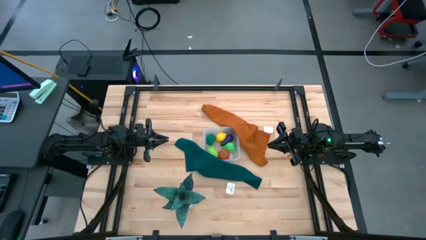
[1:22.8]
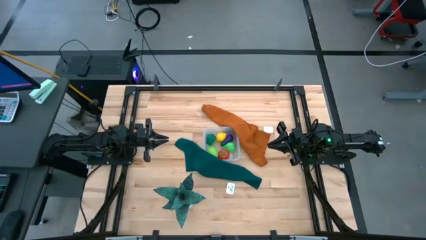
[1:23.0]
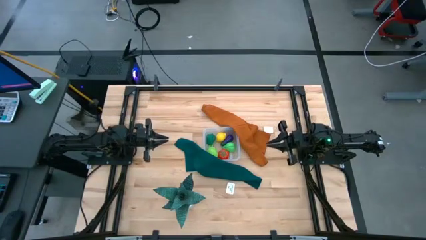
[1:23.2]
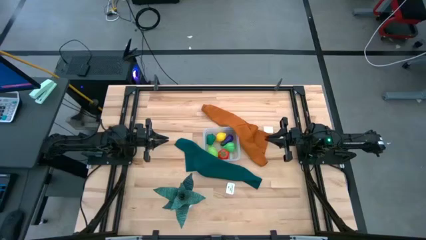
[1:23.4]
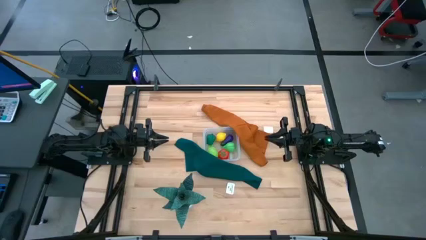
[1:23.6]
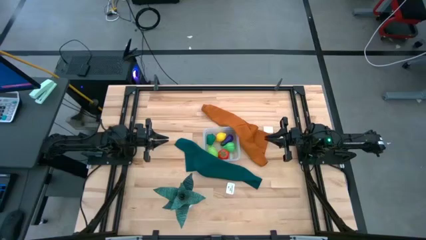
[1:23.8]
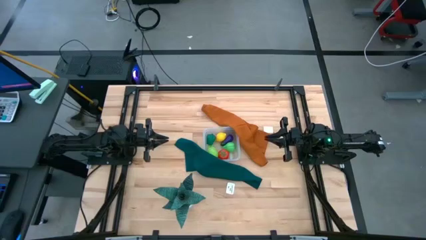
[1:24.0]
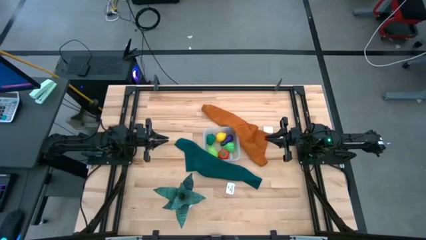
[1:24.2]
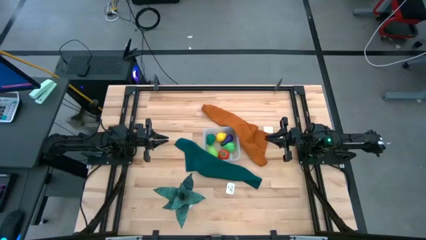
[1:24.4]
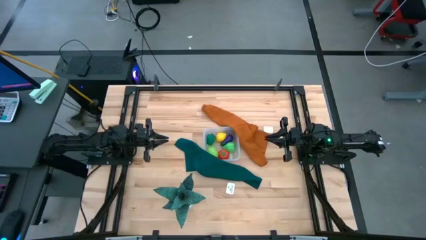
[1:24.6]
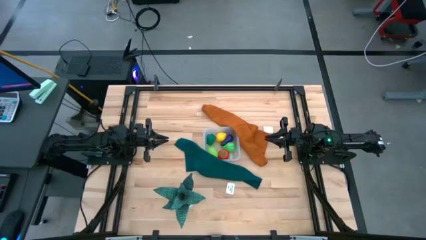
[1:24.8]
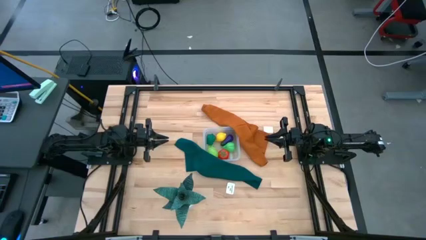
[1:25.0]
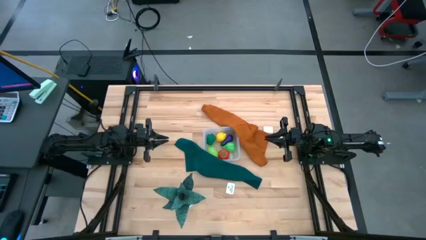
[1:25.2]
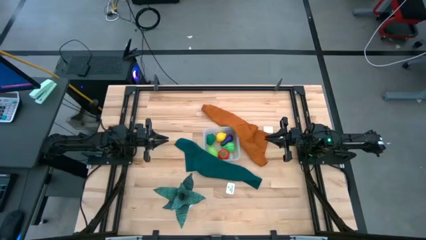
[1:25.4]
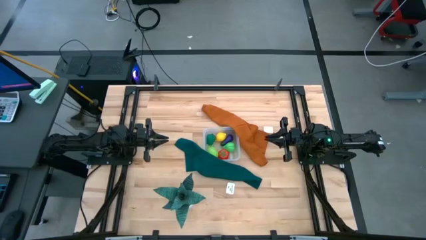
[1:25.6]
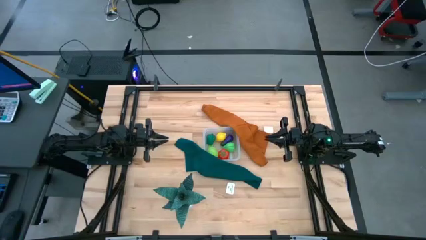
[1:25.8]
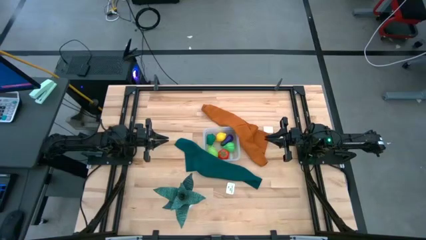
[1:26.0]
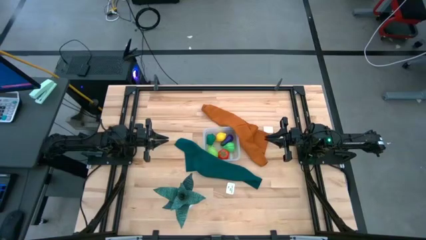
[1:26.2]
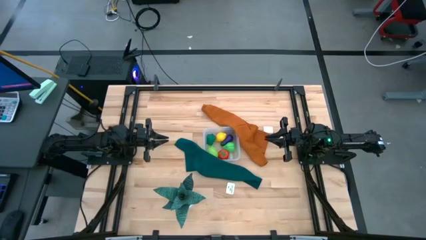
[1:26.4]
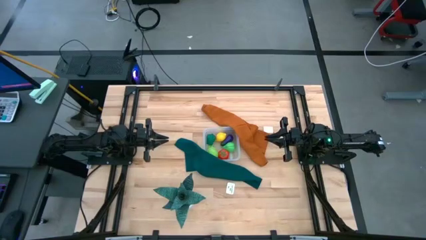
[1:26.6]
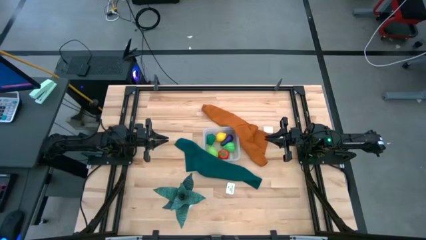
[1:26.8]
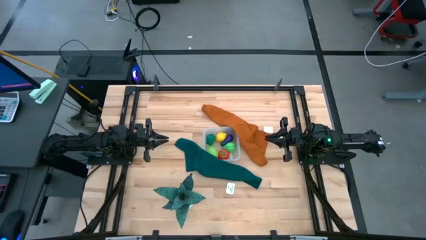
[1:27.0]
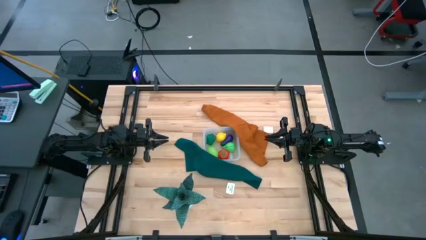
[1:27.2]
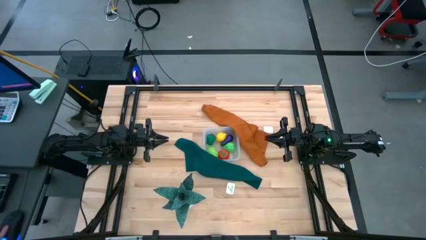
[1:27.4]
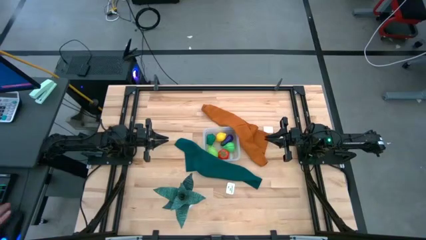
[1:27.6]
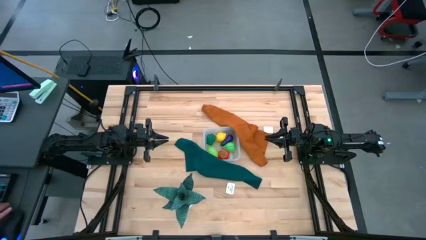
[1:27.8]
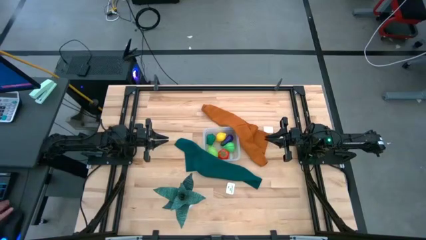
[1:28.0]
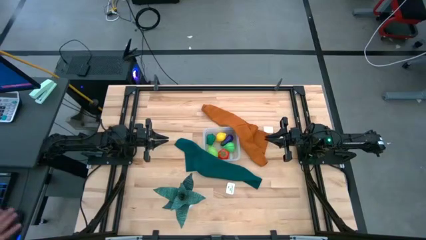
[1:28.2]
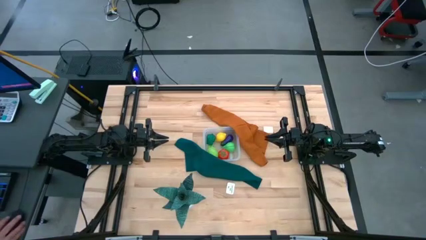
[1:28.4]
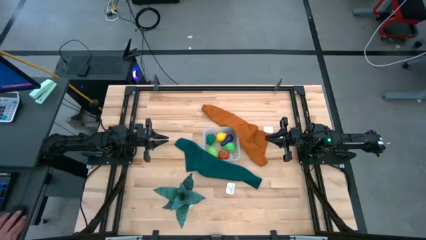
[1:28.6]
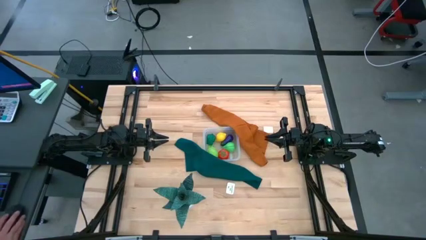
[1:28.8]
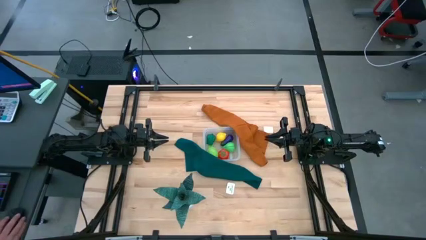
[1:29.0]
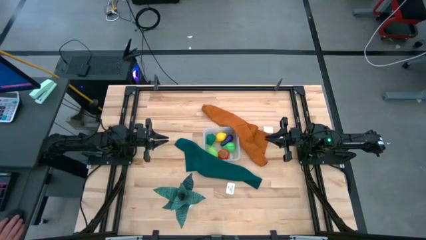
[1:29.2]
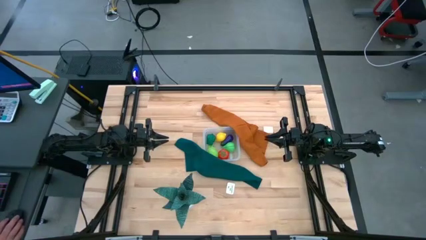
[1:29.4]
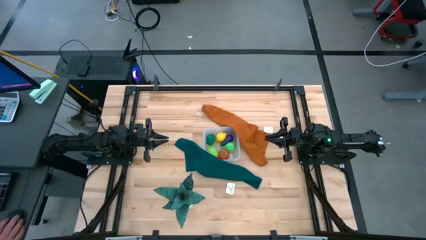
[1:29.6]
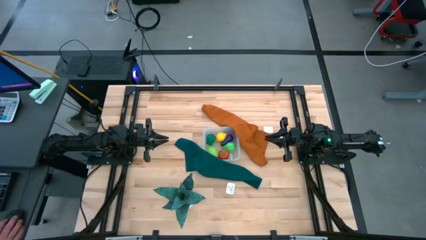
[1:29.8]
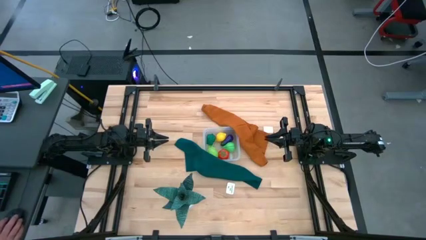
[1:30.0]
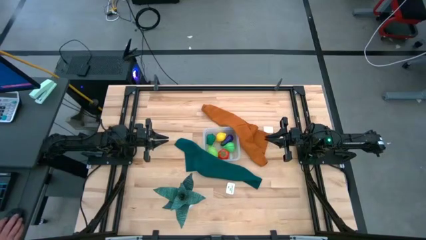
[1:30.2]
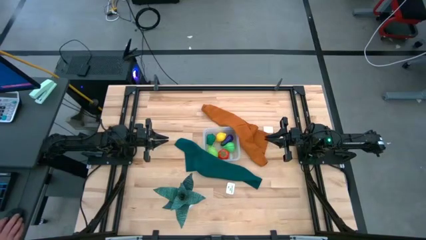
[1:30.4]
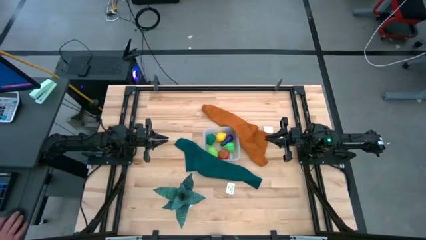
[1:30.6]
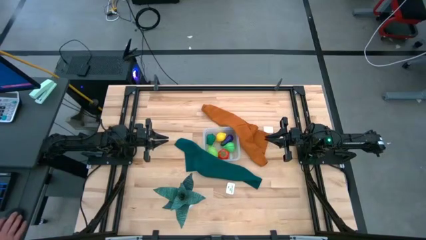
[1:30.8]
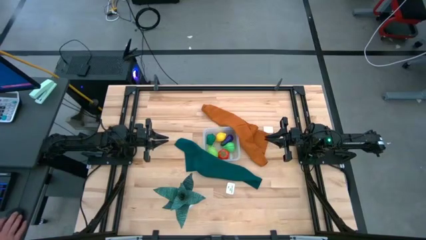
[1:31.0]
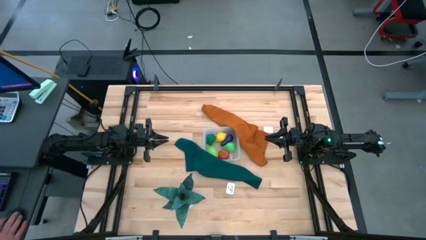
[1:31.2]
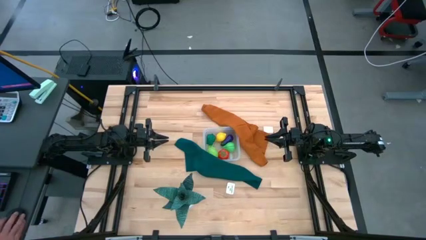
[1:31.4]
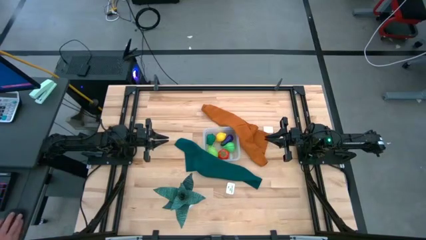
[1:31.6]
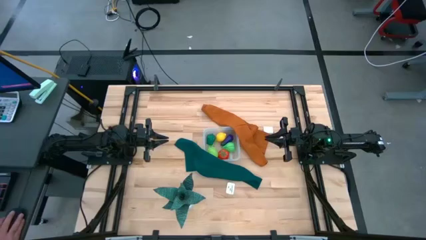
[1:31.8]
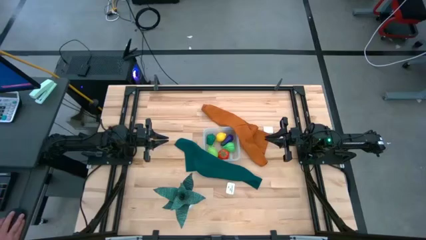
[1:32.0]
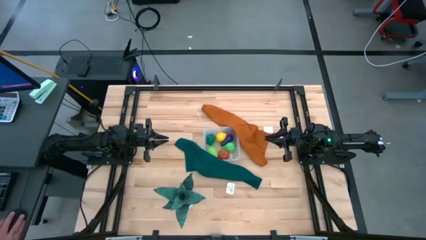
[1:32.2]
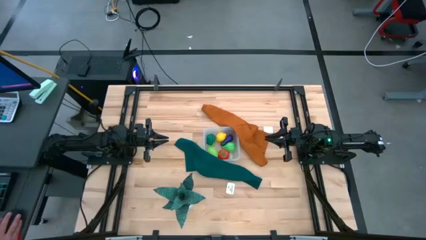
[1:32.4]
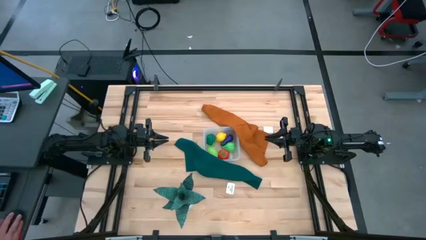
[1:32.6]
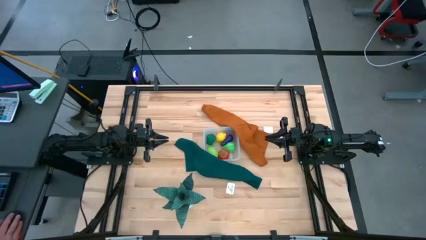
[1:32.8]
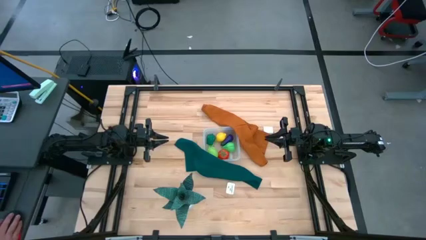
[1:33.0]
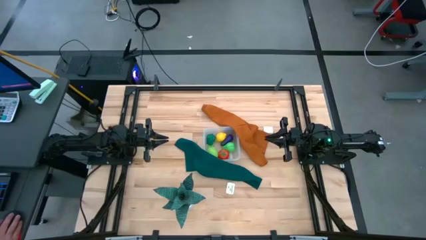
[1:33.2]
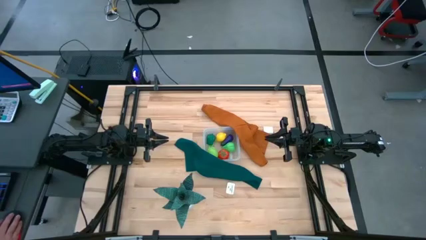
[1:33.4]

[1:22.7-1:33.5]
Task: Pick and placing Produce into tupperware
Return to Home Position
